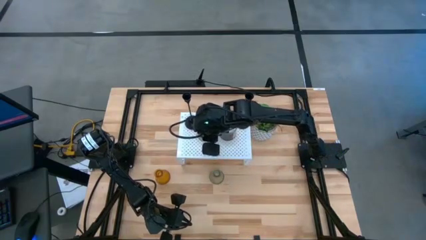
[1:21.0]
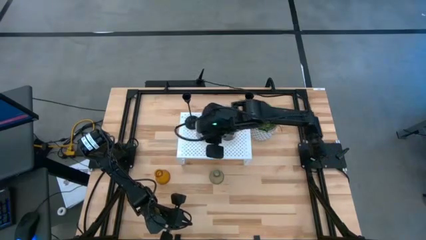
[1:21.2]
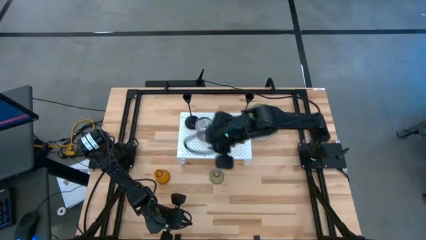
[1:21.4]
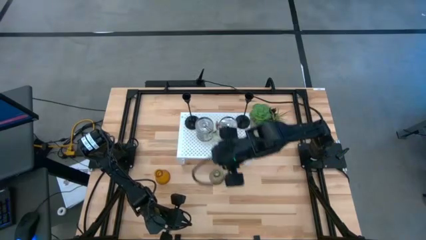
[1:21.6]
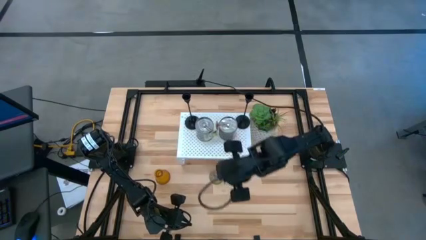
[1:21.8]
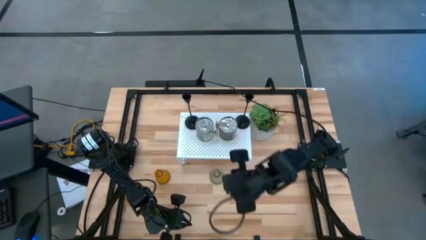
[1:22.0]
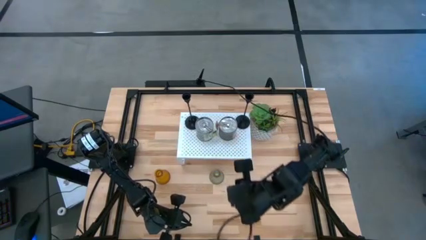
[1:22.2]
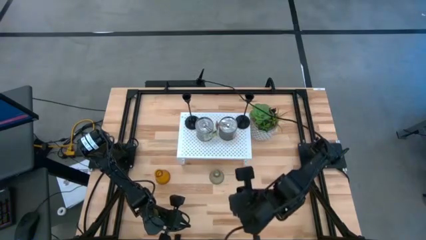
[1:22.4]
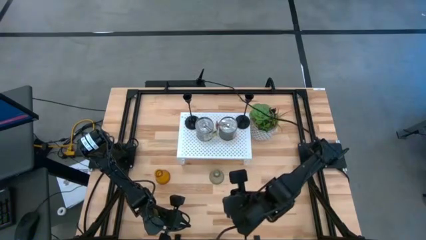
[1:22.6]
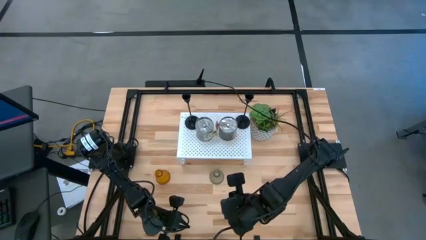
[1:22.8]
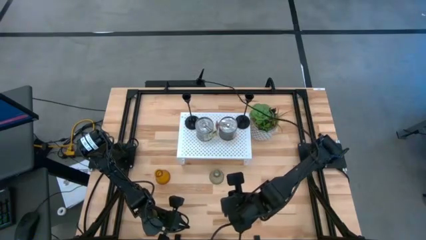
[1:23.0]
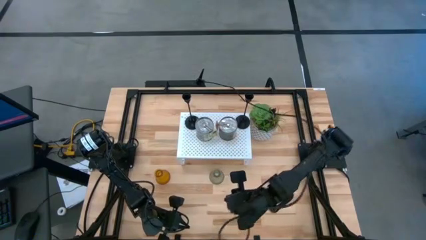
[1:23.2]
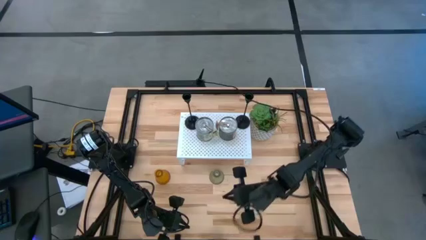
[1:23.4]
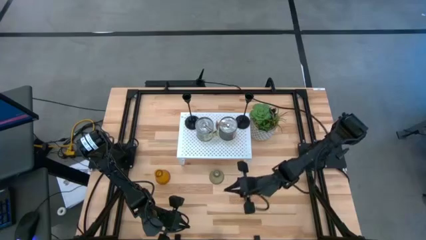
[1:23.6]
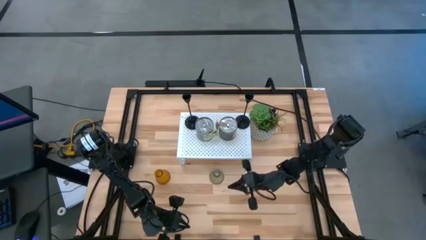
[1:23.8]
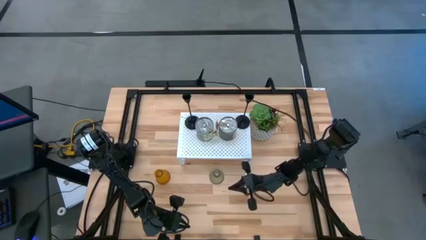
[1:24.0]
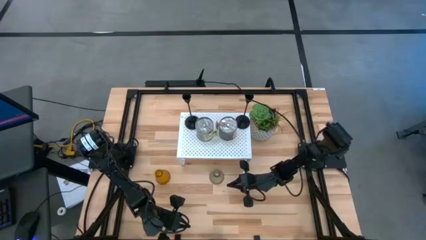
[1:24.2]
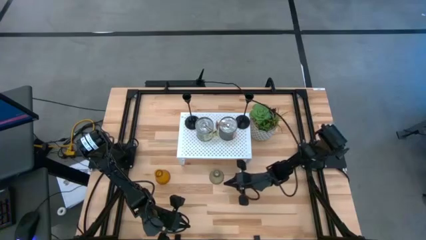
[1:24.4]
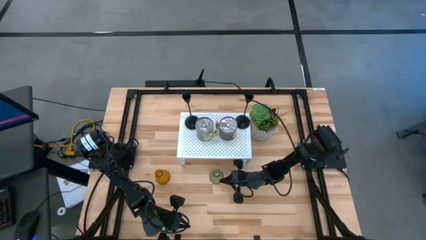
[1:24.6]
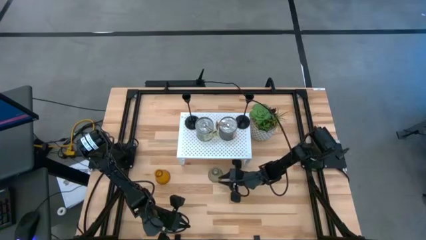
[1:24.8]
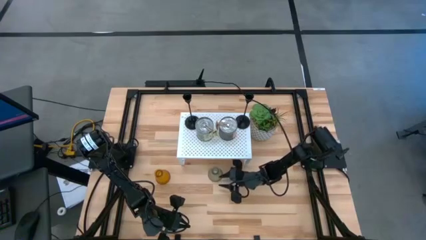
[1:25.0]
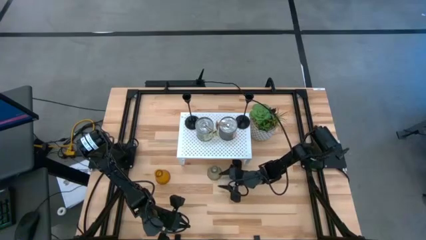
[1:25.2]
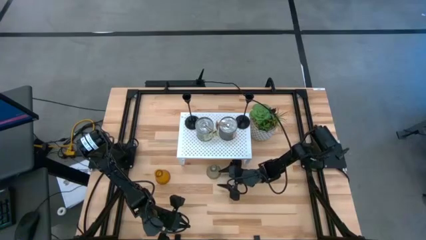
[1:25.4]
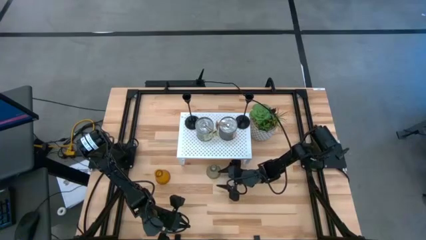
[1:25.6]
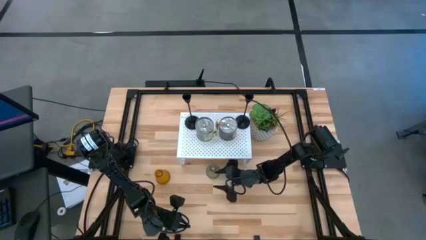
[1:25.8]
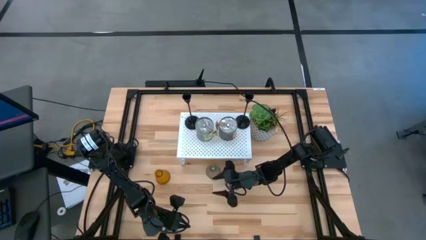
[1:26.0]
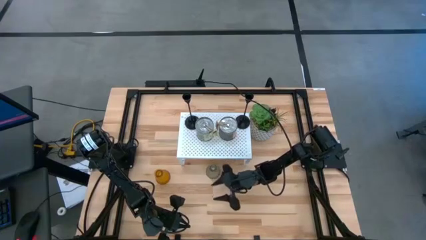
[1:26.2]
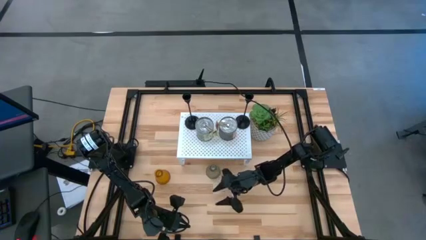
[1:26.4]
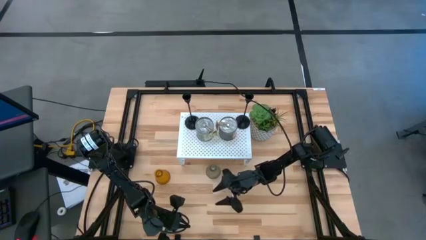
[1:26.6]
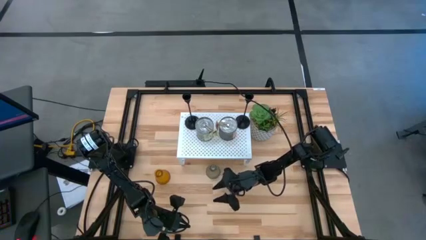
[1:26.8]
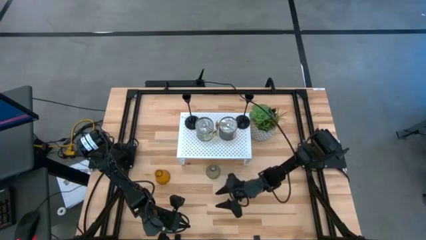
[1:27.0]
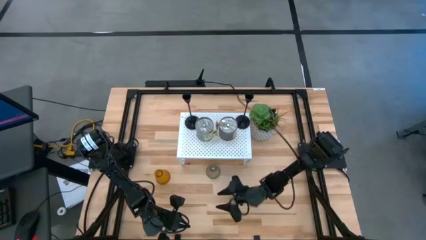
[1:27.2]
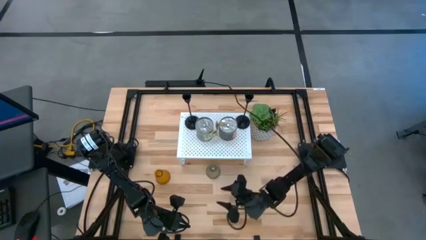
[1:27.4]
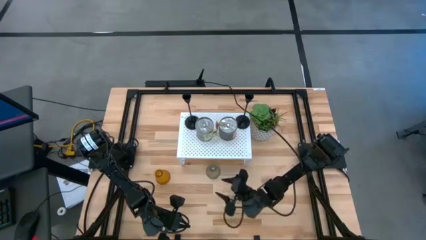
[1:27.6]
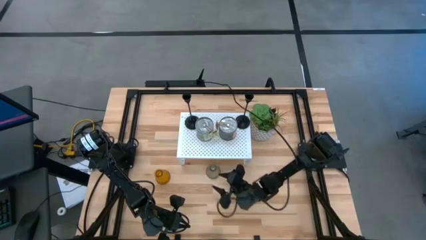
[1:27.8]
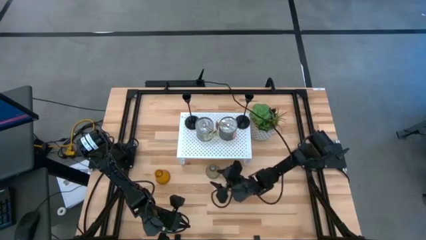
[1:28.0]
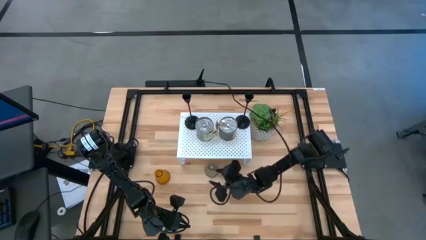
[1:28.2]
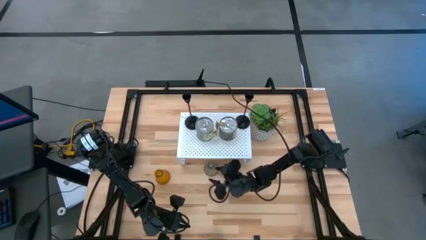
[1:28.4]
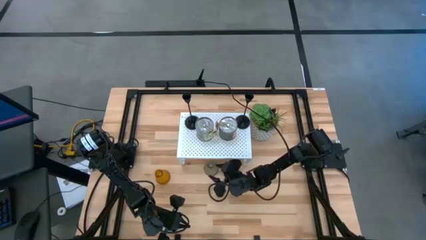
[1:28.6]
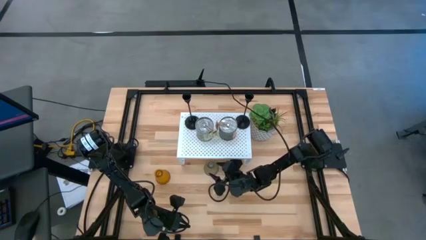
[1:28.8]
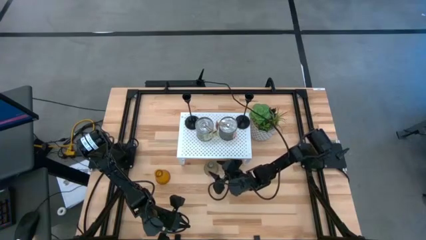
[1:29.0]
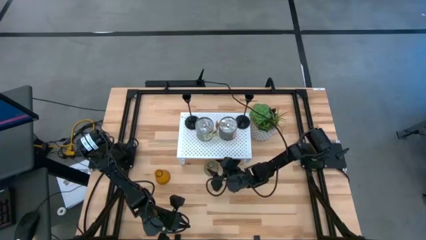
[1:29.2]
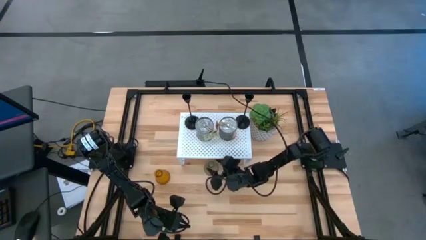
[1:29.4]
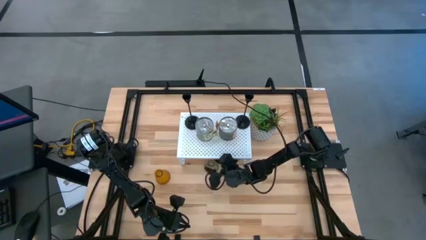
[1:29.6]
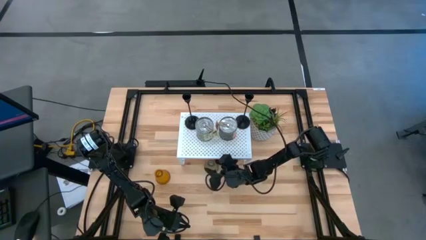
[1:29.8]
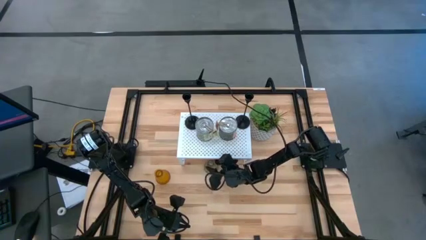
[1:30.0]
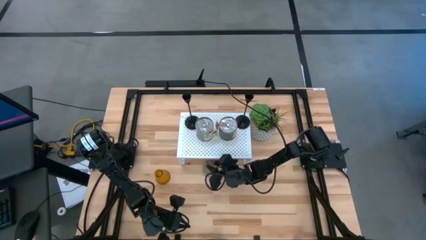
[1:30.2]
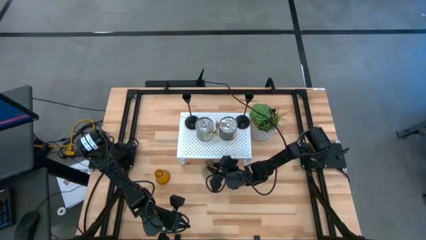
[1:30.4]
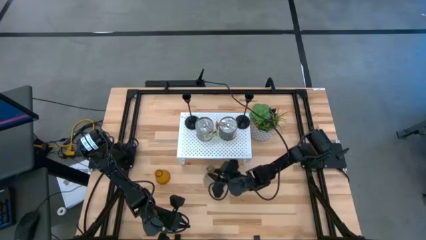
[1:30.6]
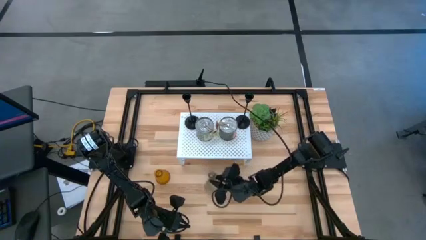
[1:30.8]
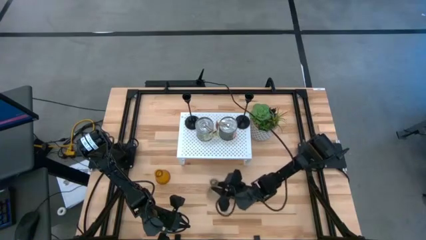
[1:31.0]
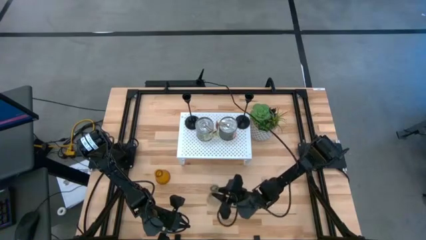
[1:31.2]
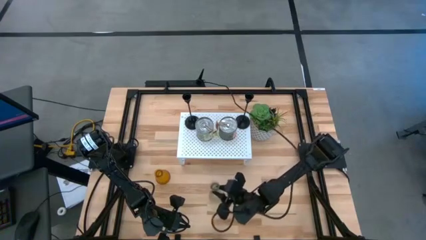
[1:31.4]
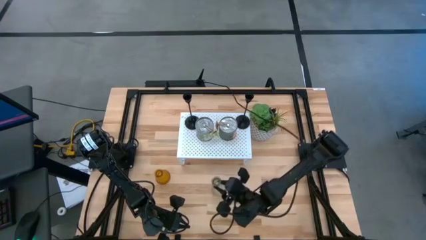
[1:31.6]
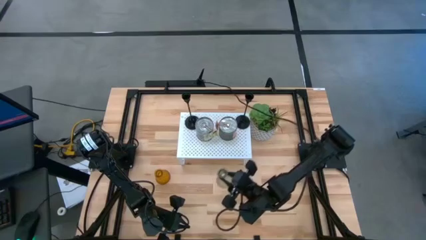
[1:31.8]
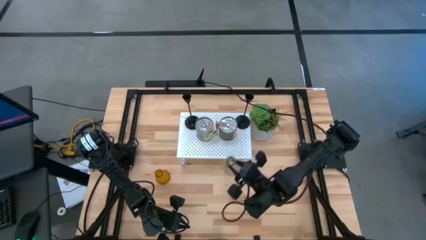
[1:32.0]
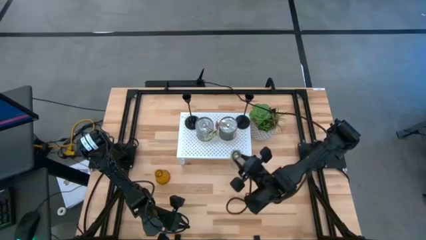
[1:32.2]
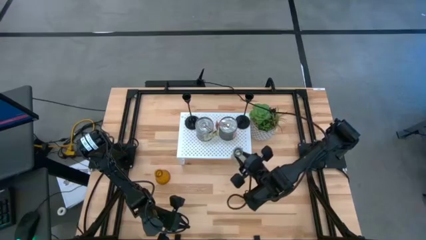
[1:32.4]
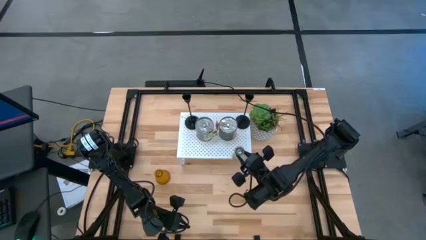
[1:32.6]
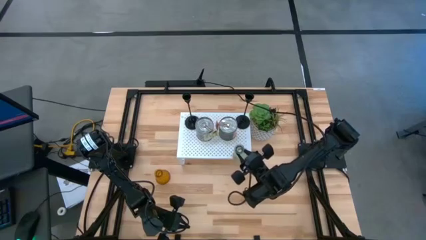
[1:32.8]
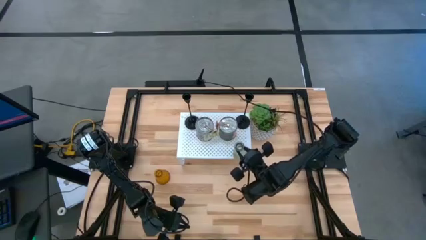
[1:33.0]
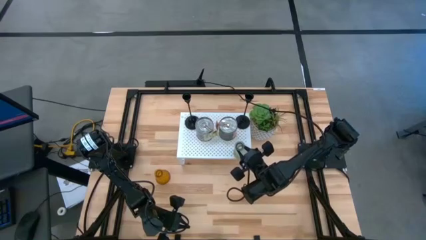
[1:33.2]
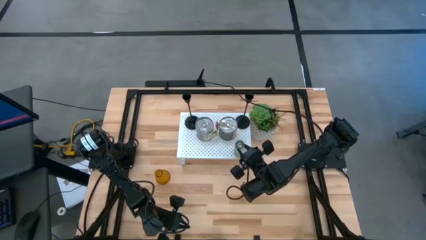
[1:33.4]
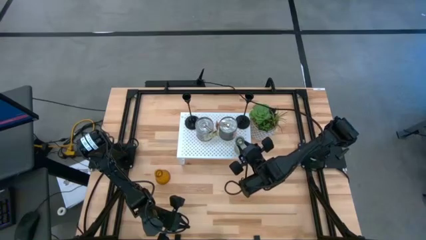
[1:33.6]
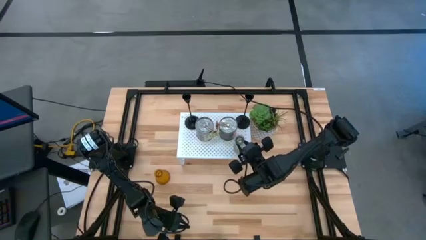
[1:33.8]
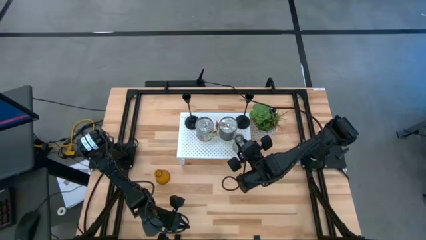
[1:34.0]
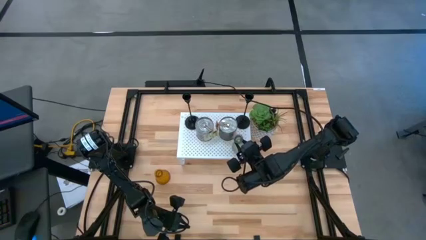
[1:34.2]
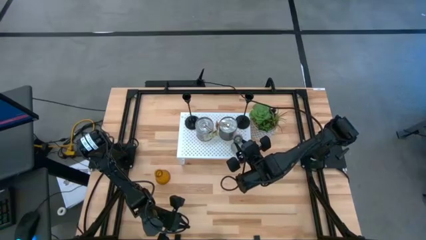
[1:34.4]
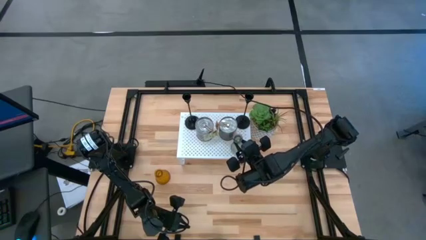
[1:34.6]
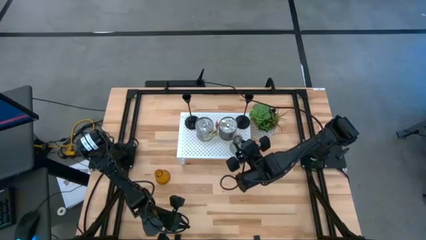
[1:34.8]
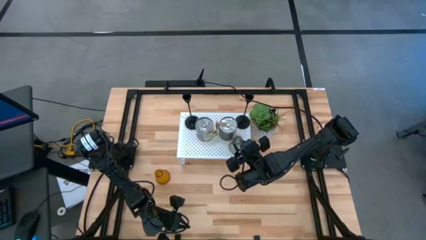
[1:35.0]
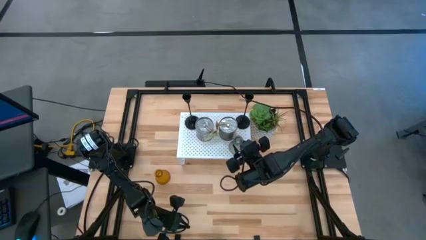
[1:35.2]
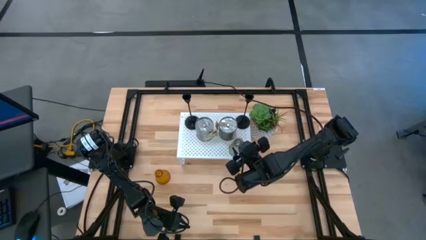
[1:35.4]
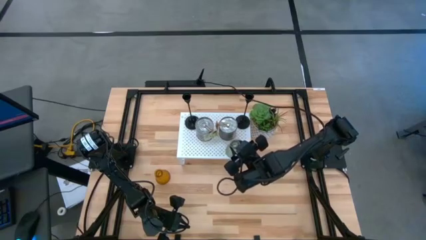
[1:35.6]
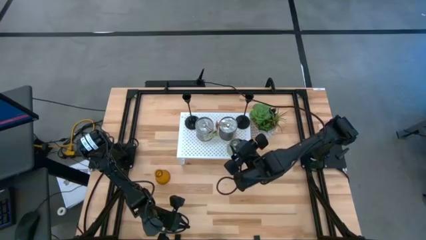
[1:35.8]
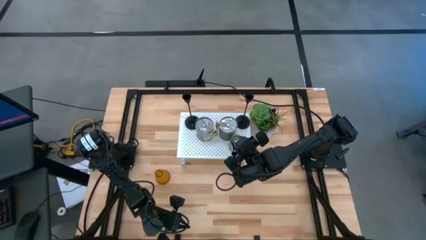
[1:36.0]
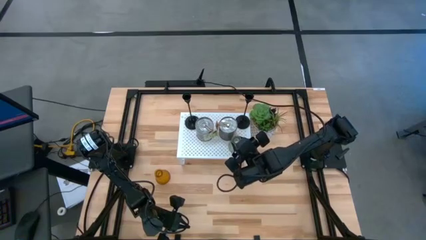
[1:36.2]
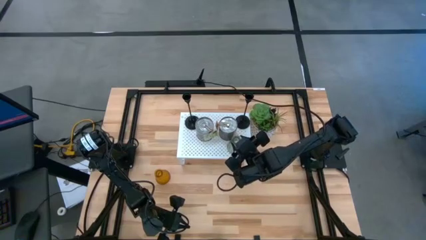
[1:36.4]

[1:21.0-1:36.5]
Task: Pick & Place candle stick holders
Put the green candle holder on the shelf
